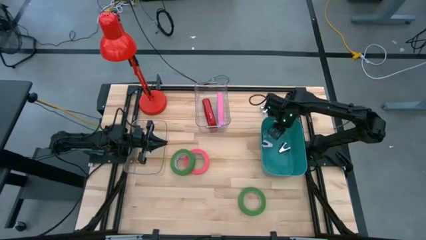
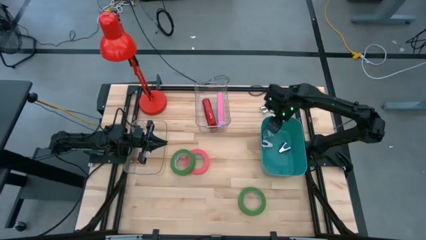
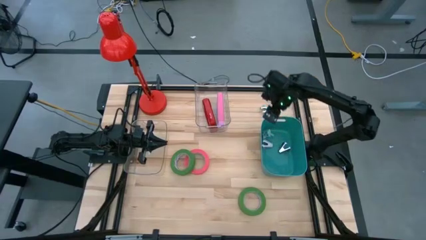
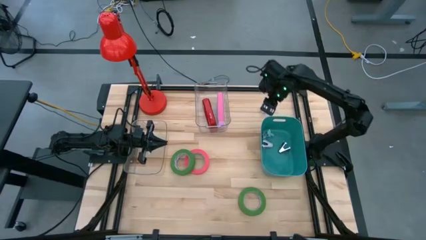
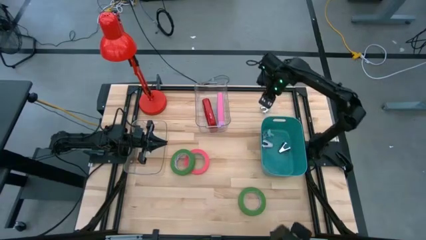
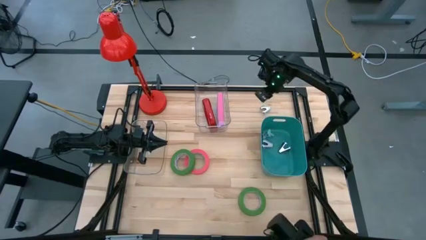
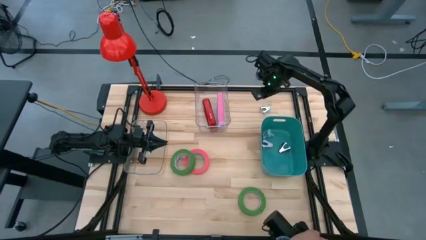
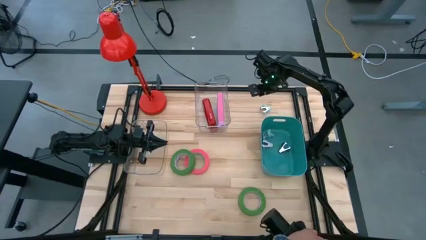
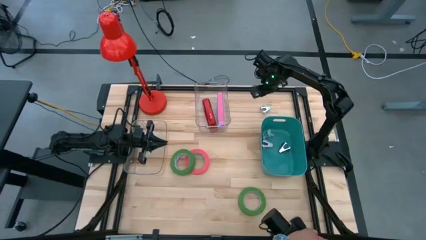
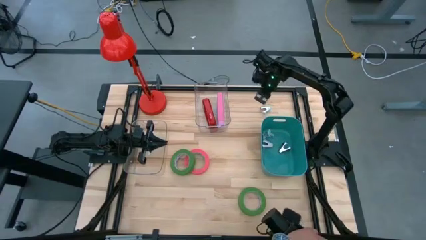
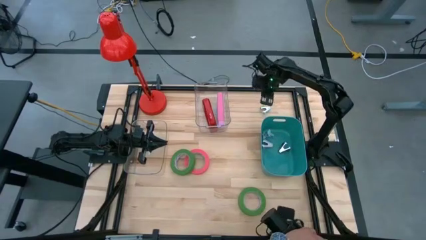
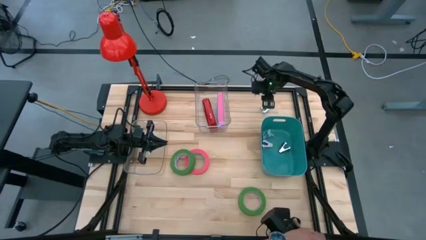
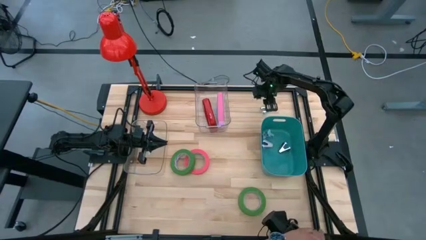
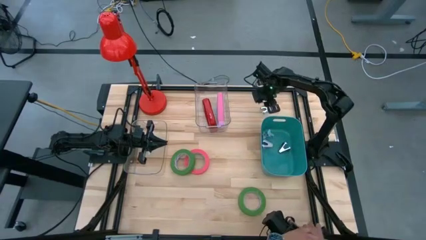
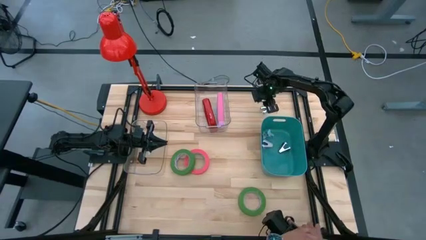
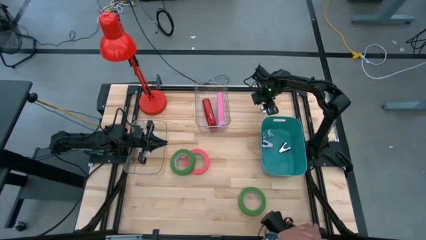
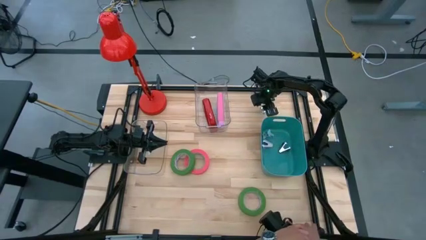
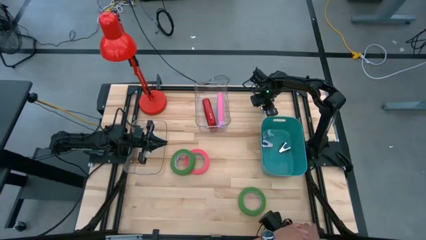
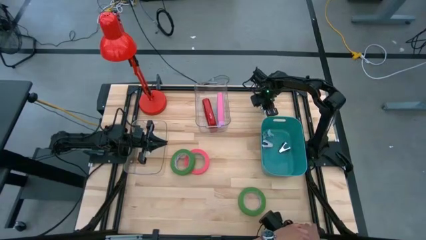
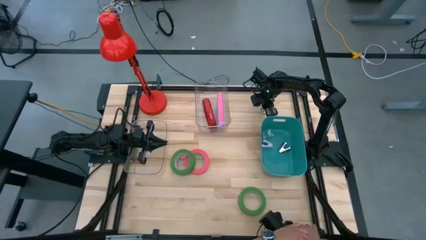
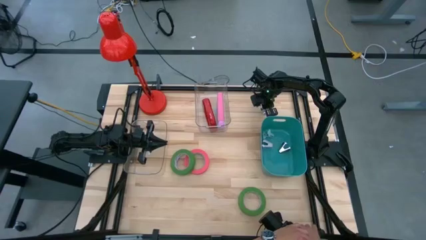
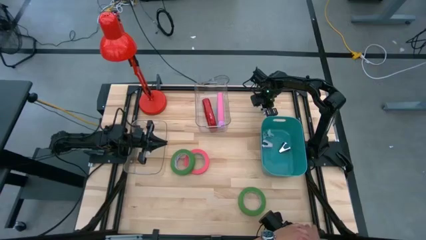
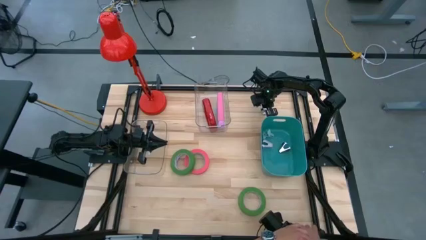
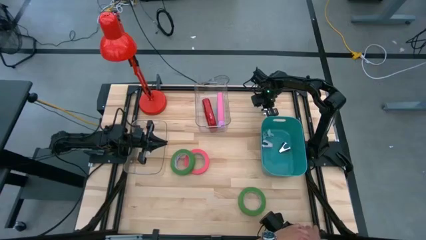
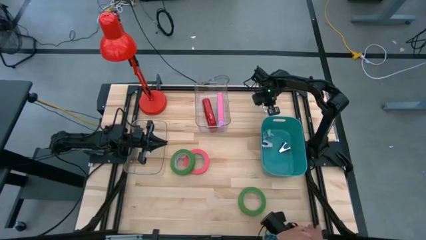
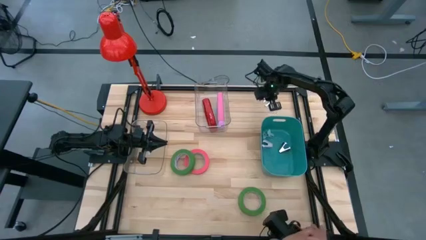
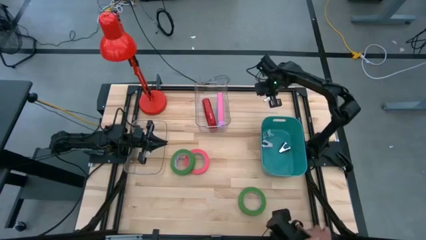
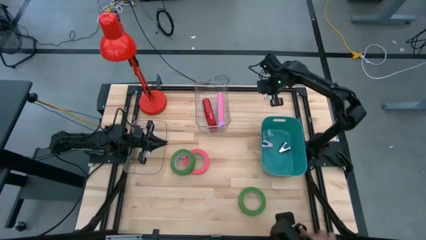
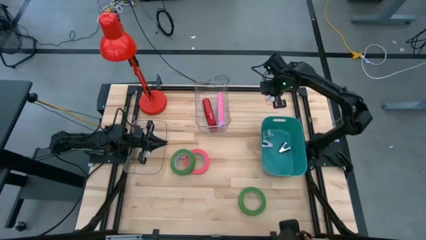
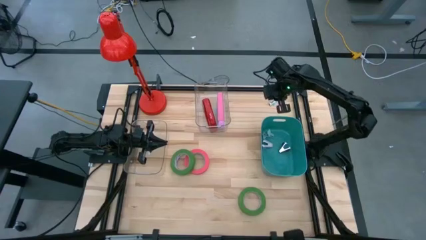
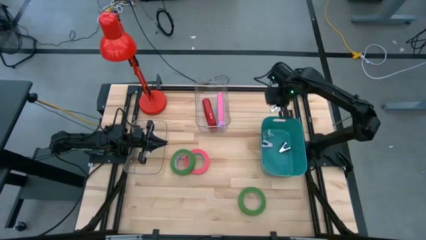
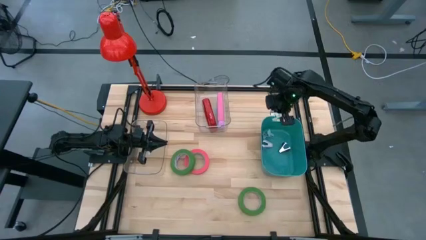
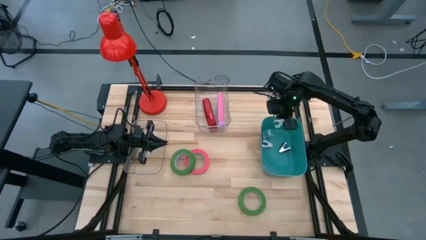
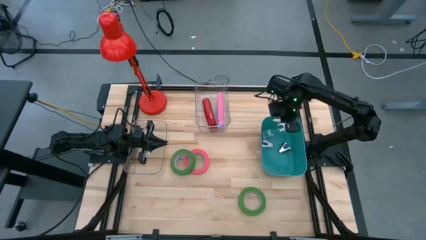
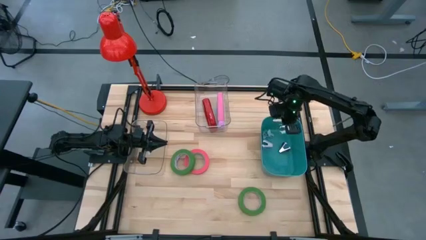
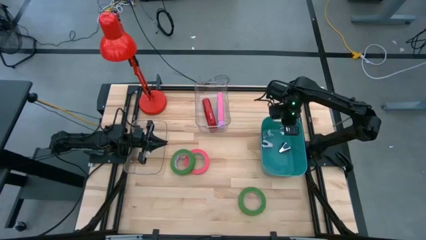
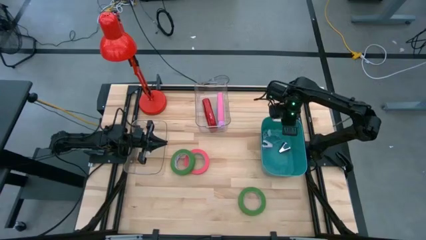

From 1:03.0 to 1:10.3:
Task: Pick and place Stapler, Stapler remover, tape
Put the light blue staple remover into the blue bin

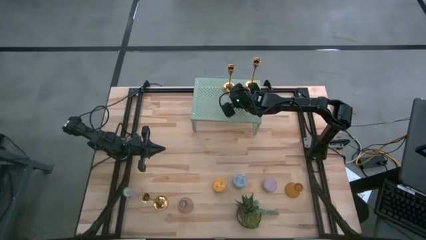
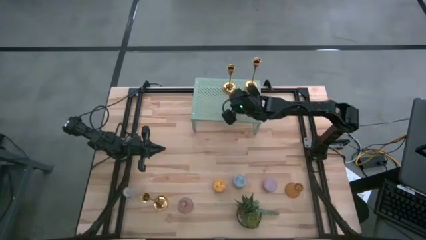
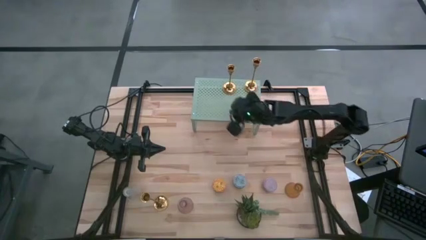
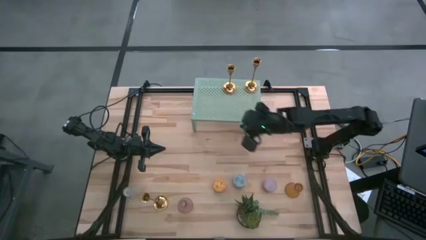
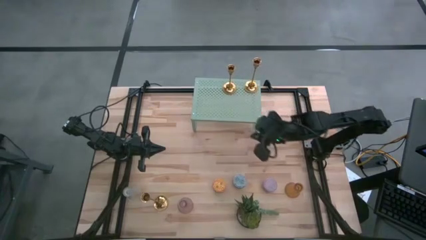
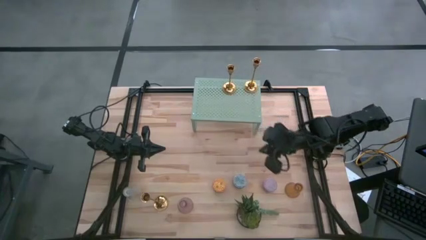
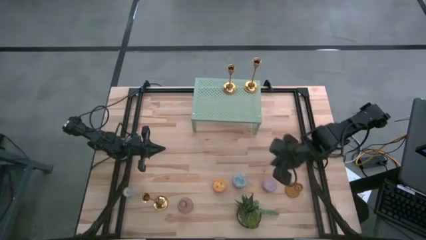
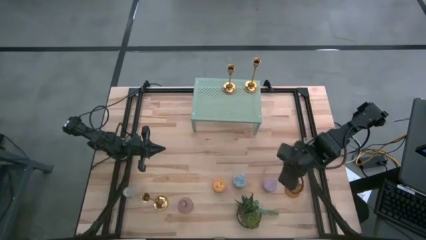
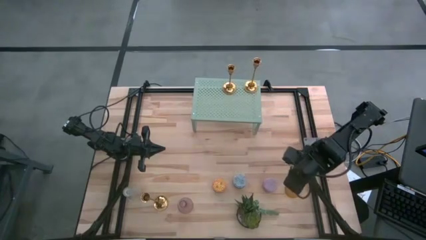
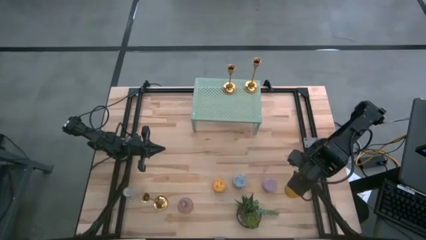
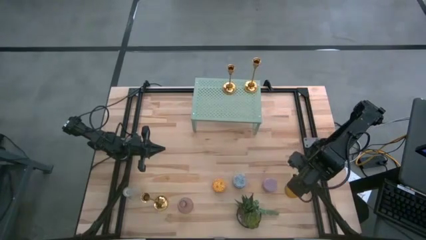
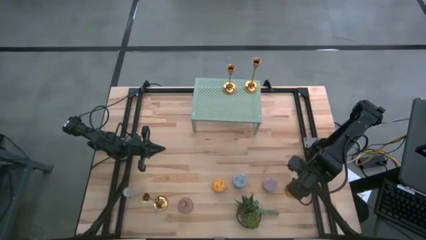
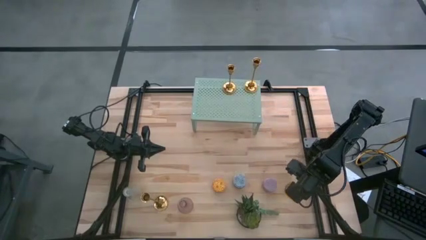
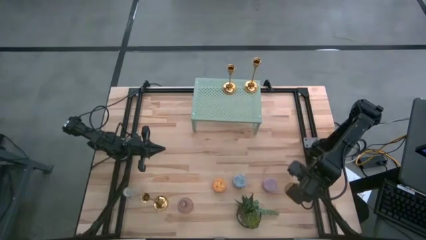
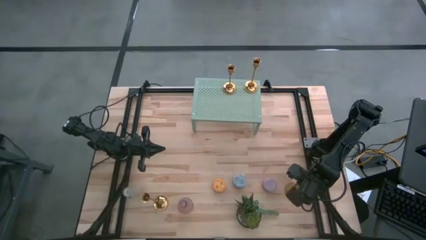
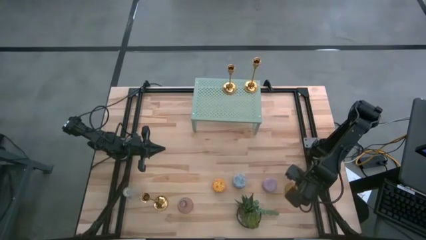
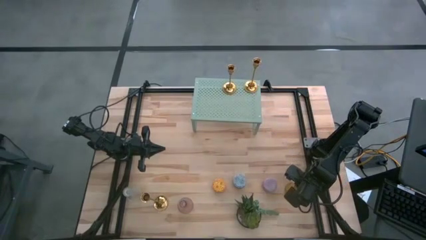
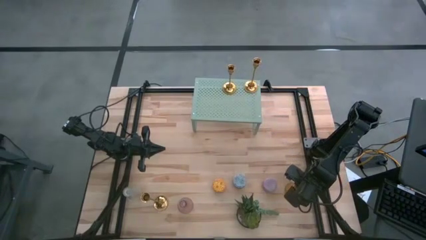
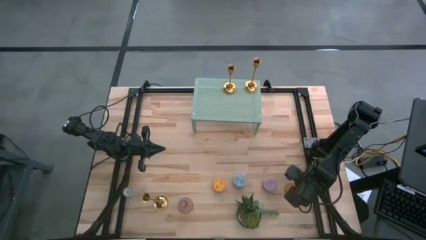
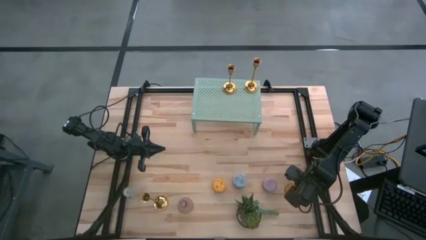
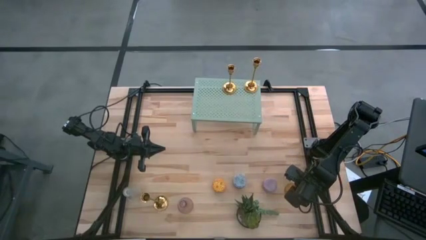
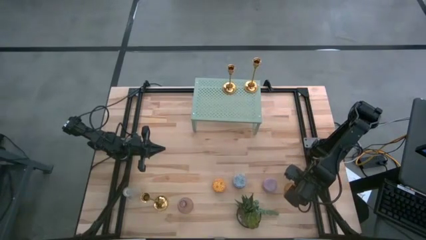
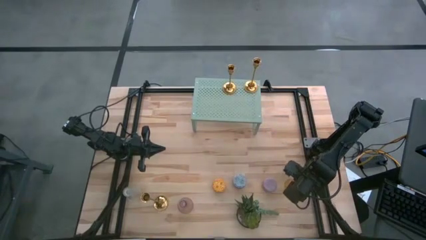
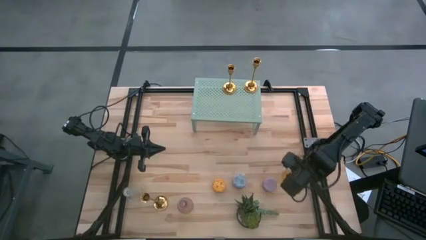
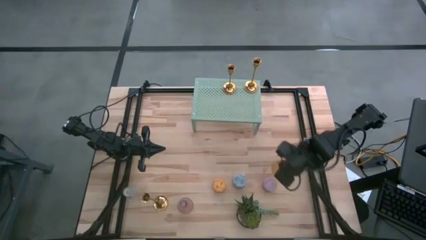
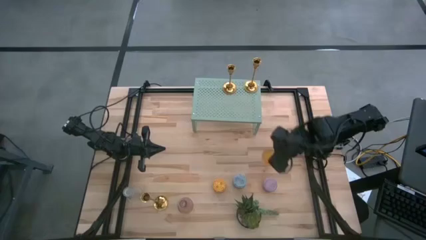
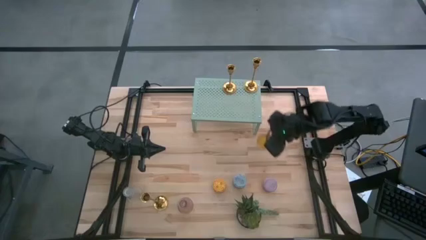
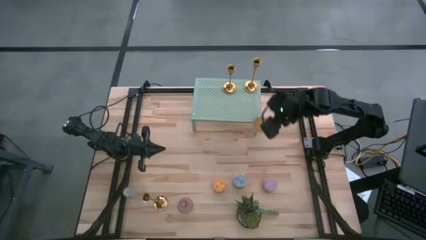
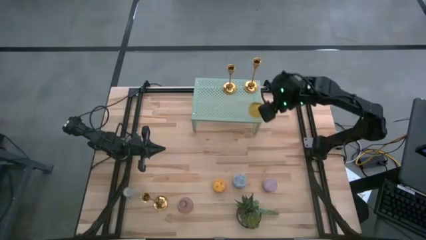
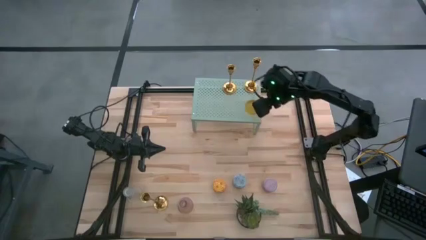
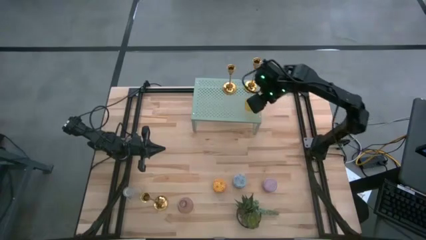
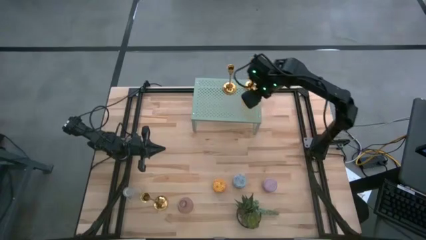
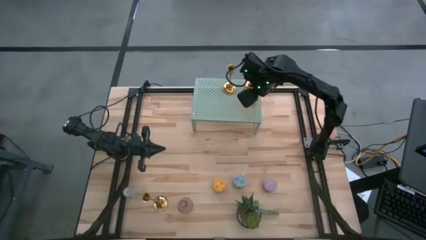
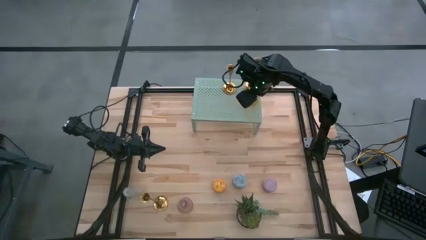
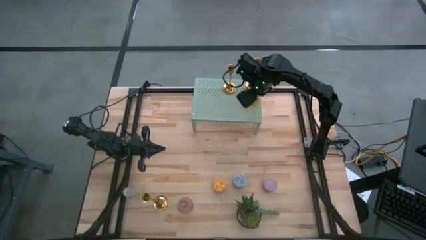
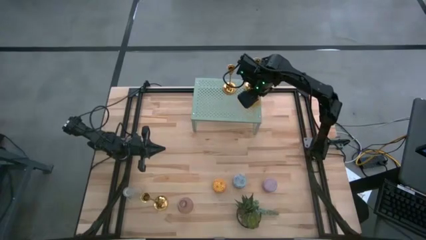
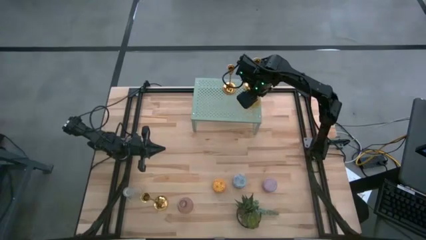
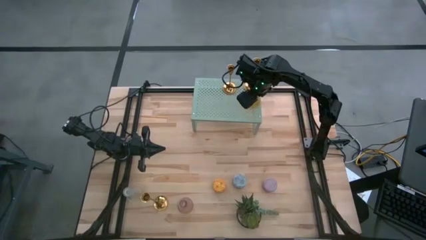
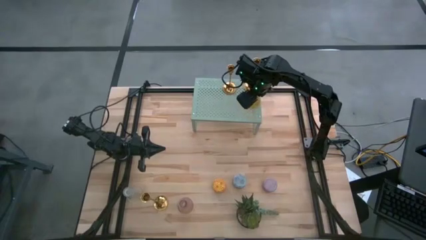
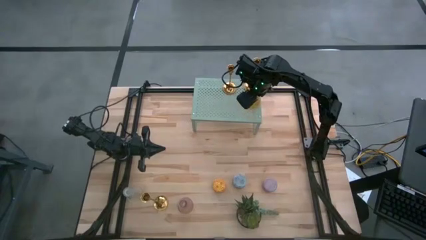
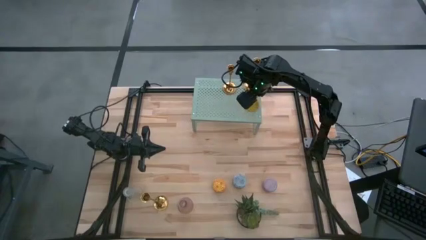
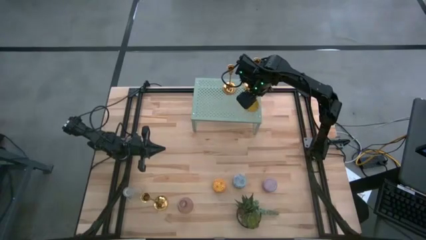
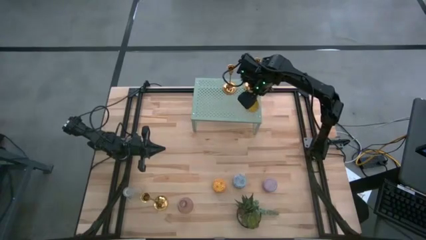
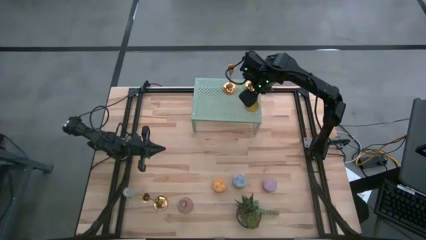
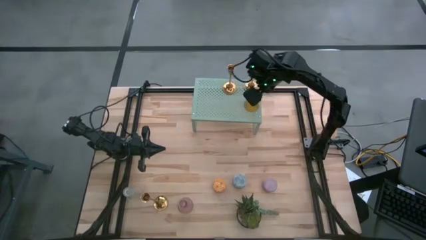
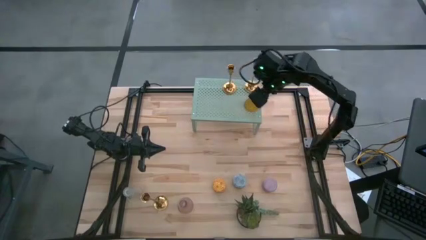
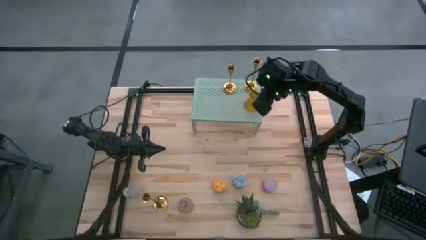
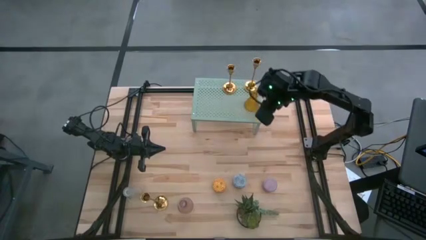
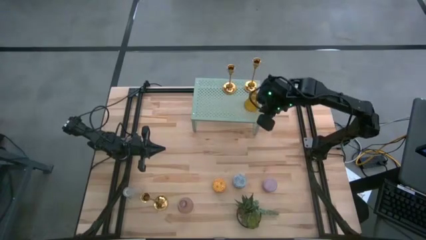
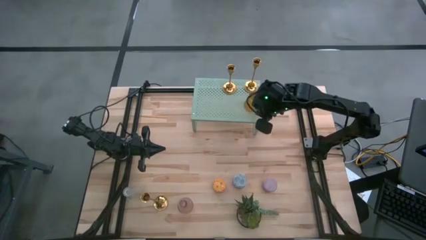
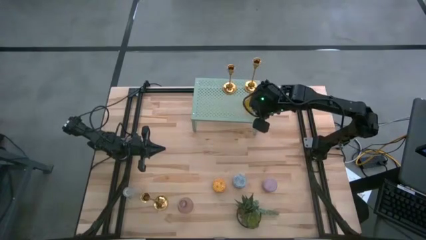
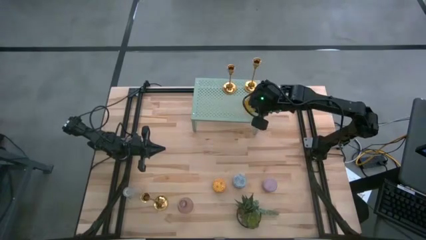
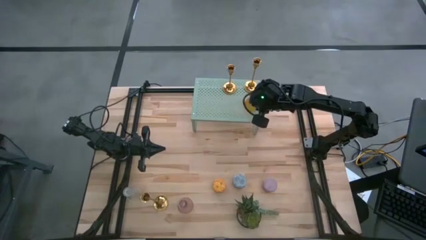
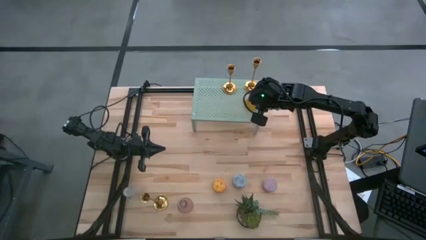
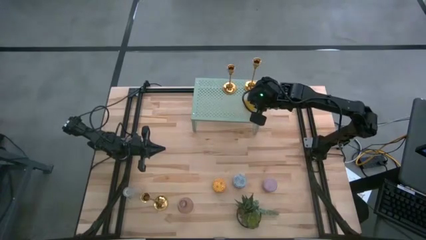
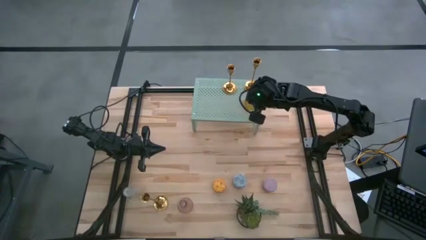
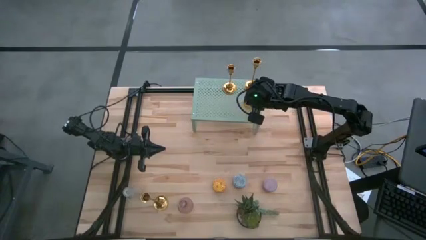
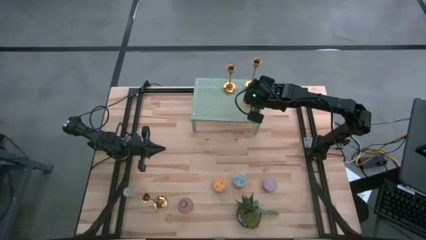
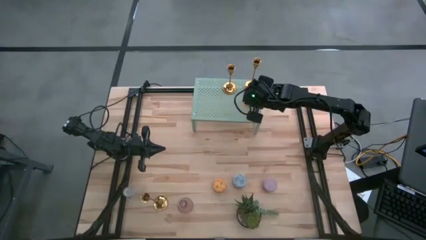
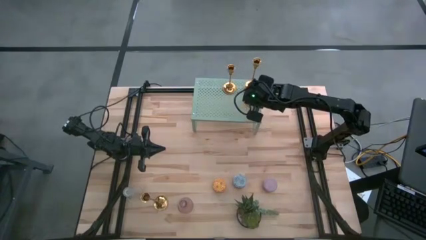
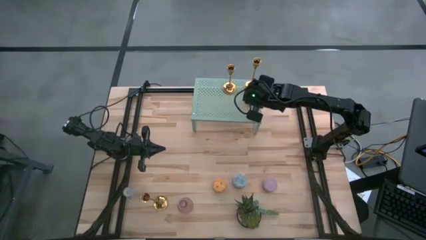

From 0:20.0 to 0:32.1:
Task: Pick & Place candle stick holders
Put the brown candle holder on the shelf
